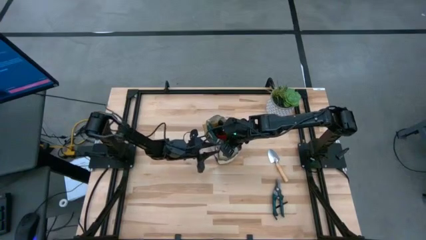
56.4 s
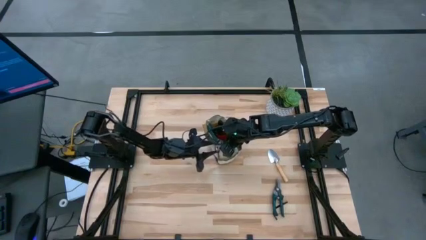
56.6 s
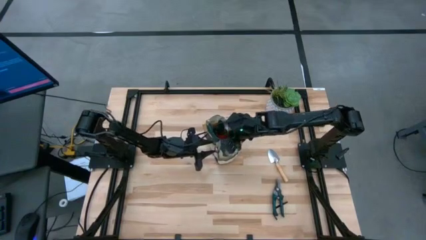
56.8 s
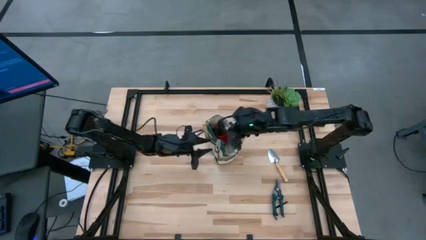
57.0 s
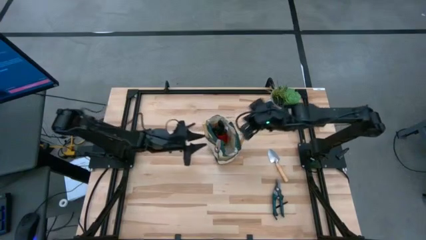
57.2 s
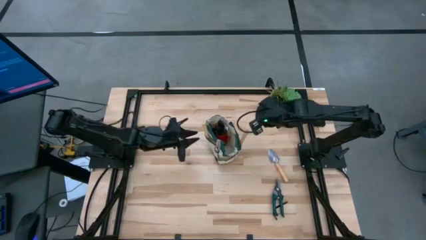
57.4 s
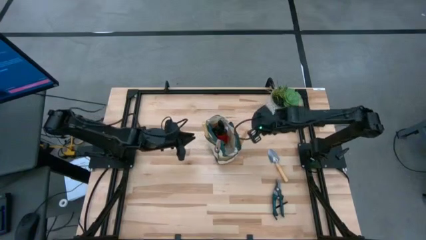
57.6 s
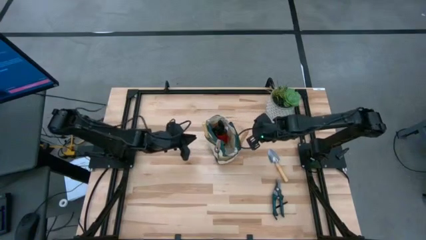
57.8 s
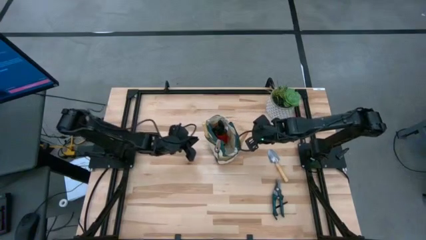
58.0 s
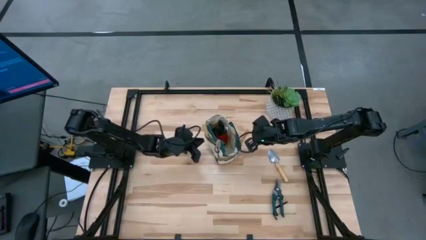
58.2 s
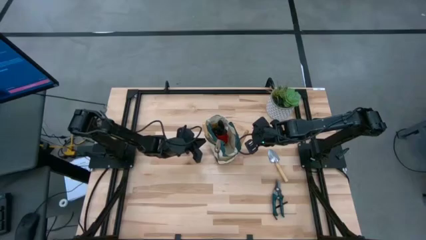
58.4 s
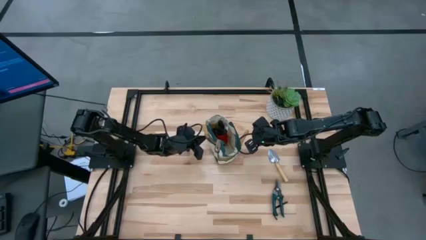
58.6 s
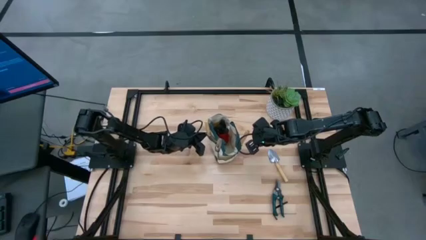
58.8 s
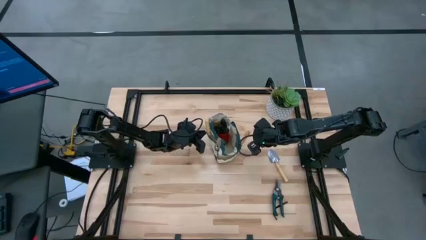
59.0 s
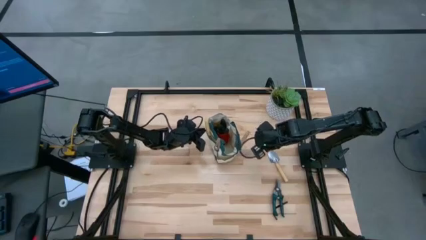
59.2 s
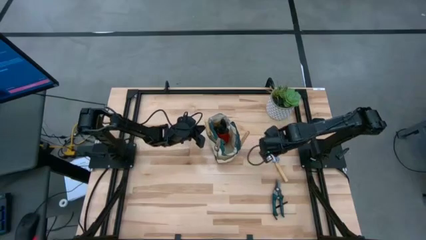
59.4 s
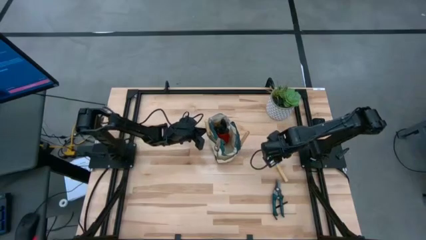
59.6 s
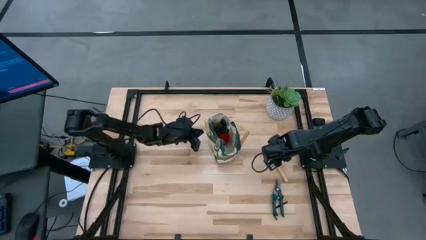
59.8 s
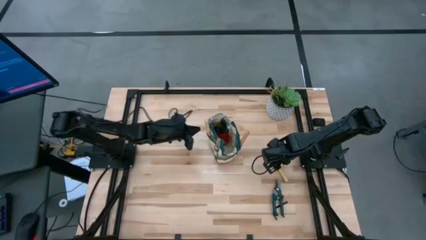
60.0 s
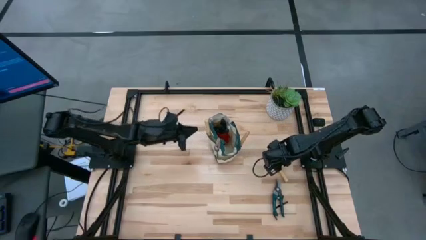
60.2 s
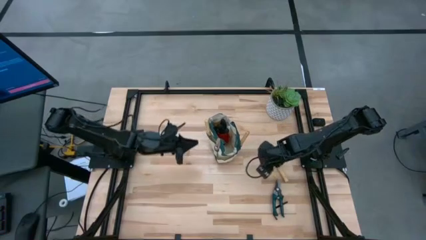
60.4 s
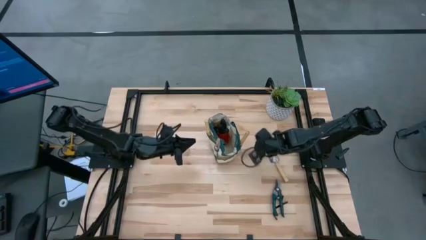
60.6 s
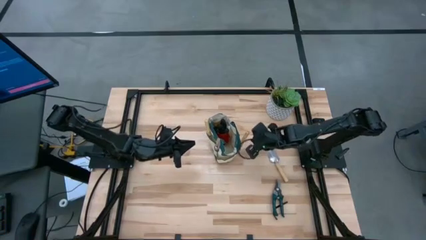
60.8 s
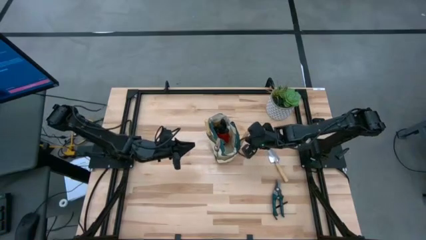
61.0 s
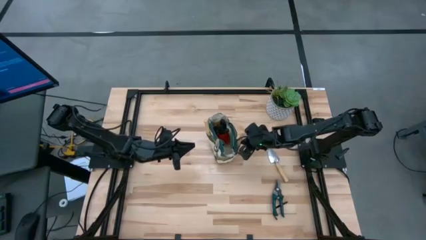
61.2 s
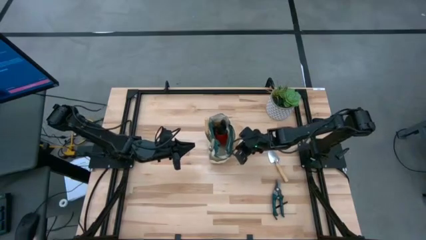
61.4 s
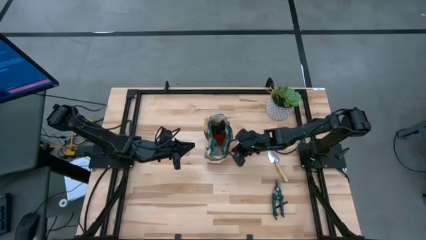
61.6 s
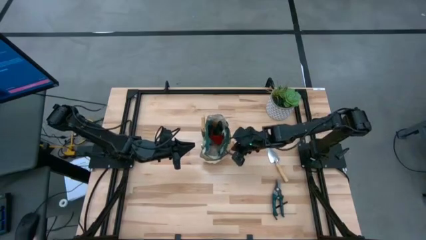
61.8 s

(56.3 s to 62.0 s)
Task: Pick & Place Garden tools in Gardening bag
Adjust the gardening bag

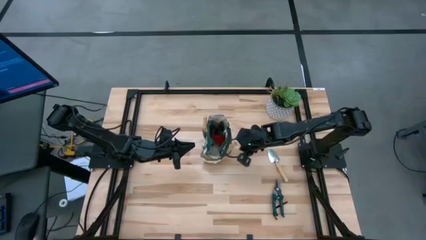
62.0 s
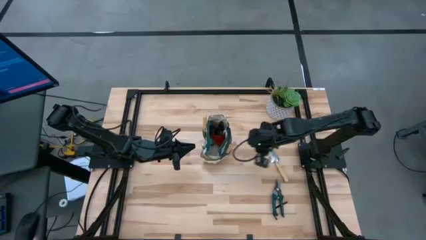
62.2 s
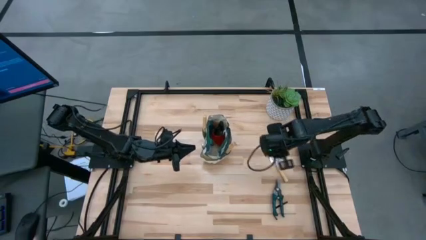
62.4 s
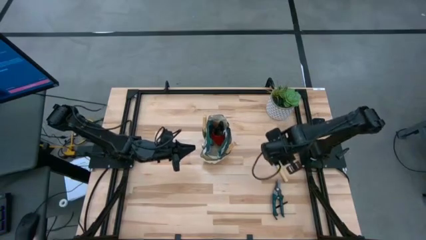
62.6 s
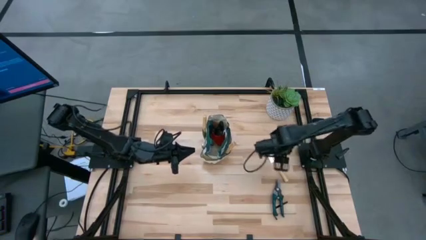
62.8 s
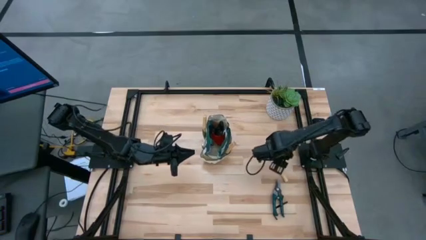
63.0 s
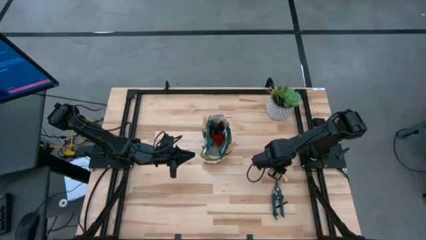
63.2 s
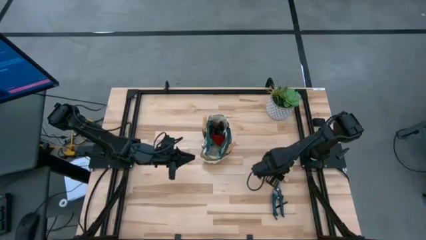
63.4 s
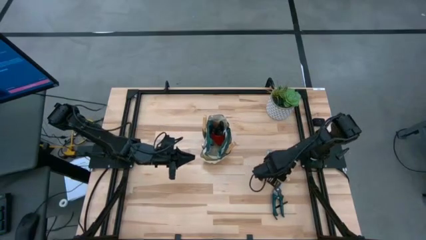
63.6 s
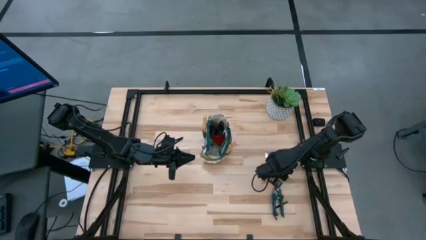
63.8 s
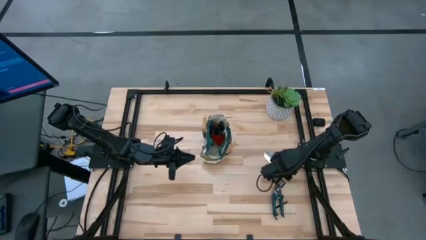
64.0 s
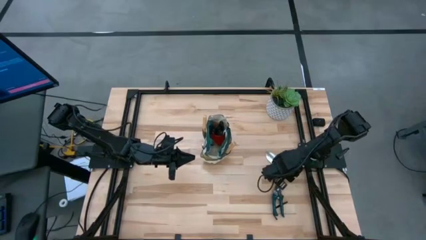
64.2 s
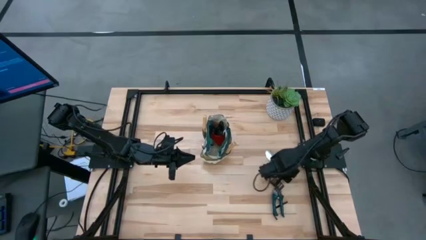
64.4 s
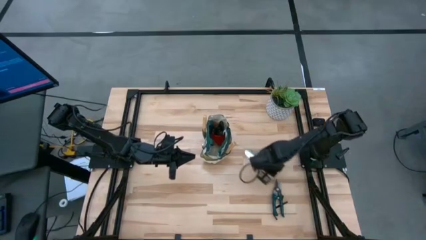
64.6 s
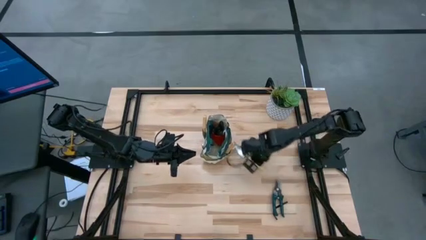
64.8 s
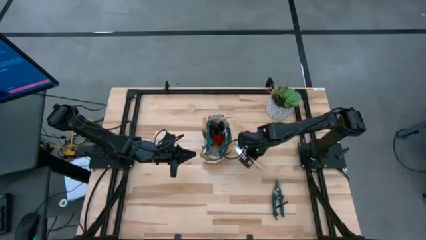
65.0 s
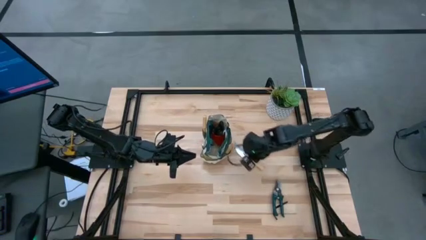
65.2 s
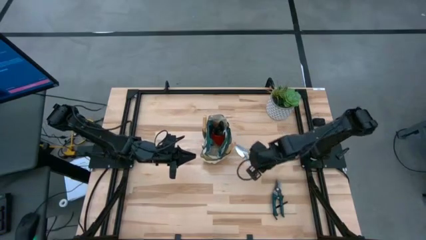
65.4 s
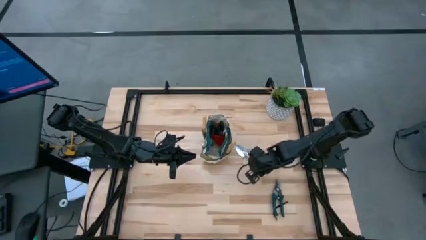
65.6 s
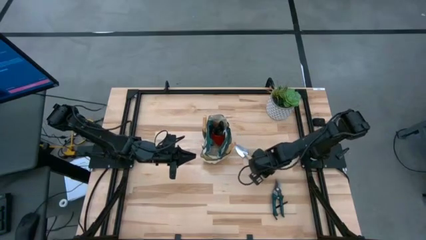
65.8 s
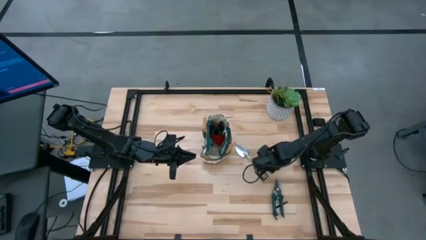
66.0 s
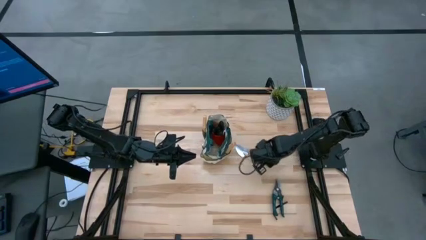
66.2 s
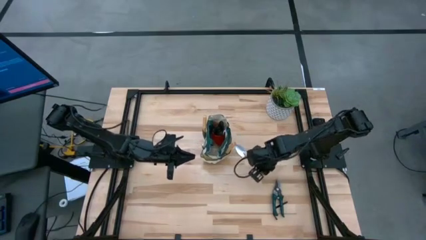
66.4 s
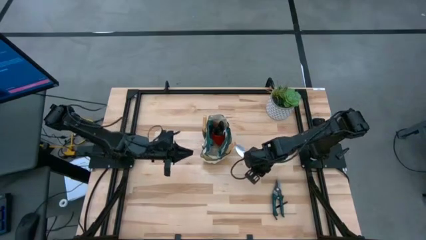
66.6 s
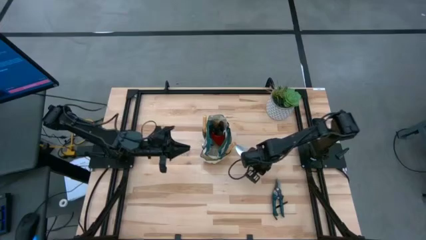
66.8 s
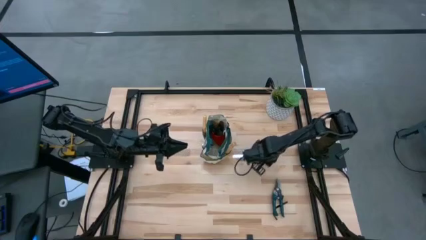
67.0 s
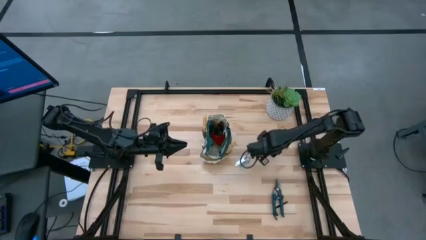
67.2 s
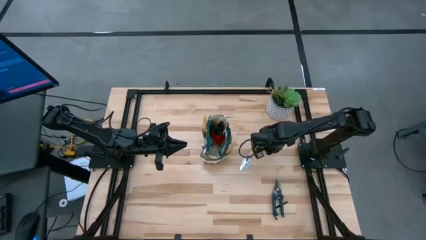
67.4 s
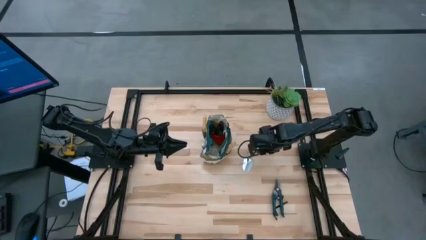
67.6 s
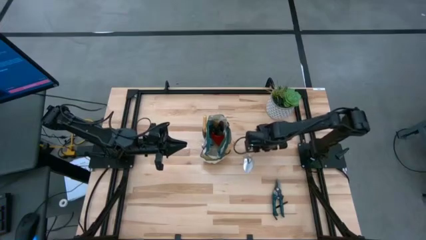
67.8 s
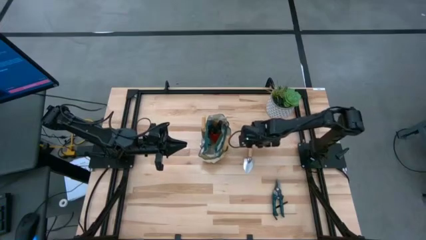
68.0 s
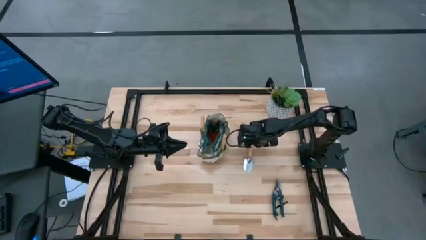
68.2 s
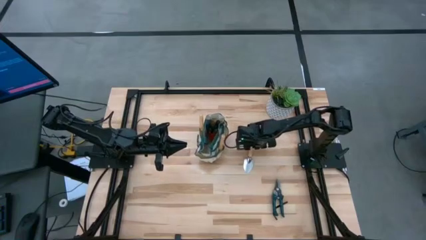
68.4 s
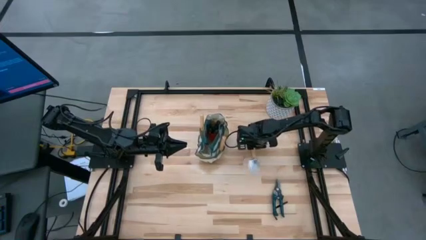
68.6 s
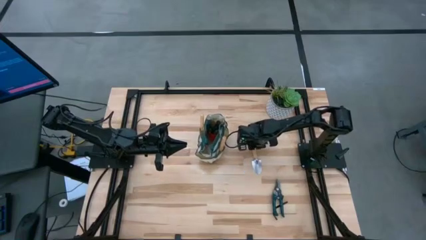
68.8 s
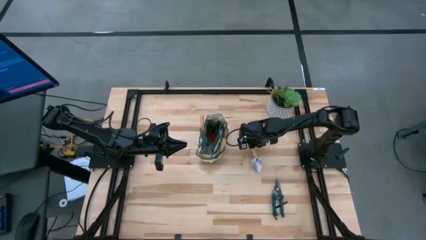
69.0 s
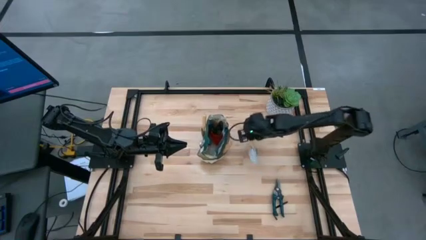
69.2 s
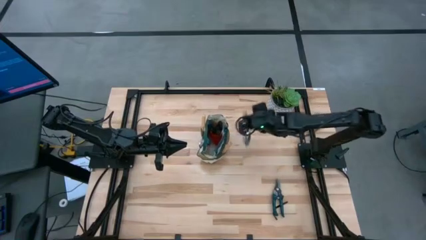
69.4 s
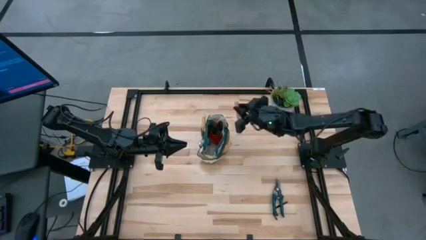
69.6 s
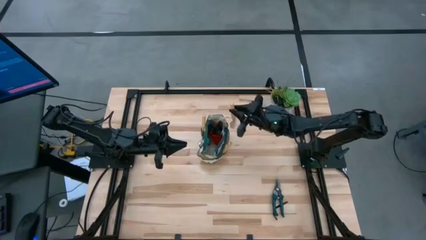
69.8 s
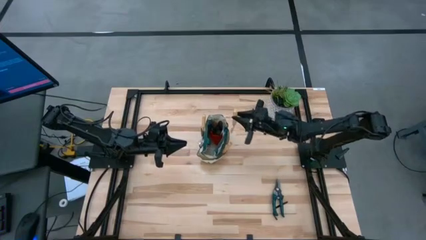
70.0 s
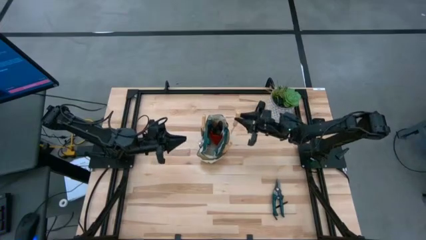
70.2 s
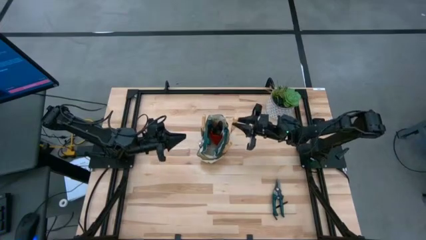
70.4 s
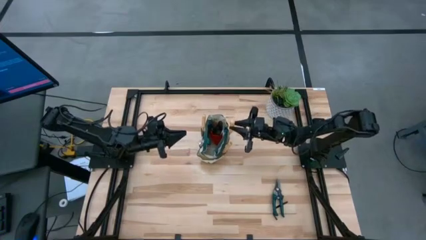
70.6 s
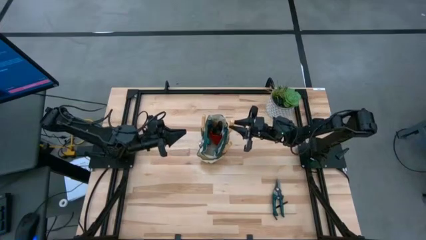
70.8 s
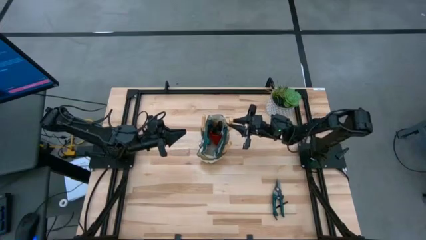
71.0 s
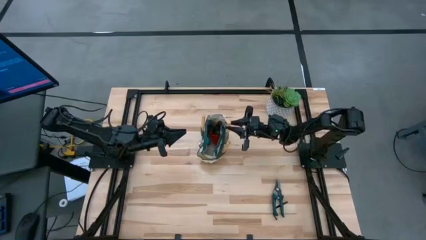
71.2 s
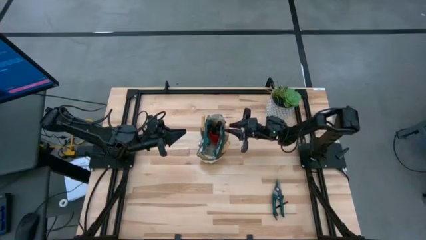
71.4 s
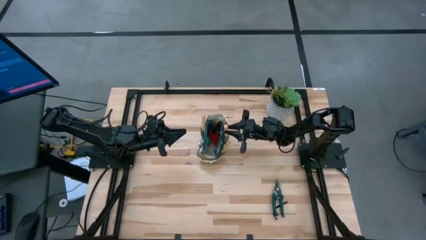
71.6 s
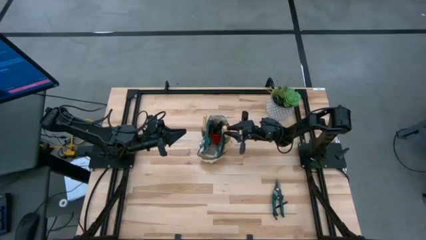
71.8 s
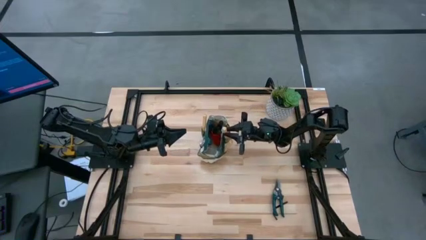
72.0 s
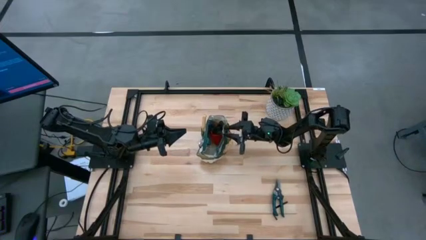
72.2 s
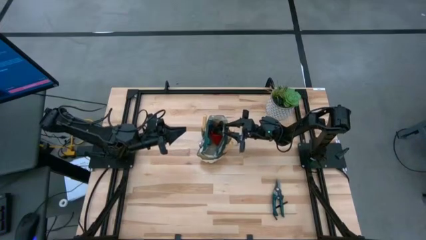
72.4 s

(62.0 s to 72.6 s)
Put the brown trowel into the gardening bag
